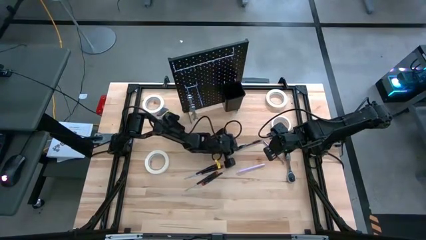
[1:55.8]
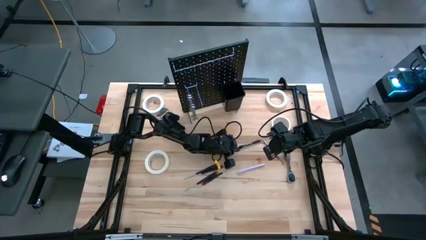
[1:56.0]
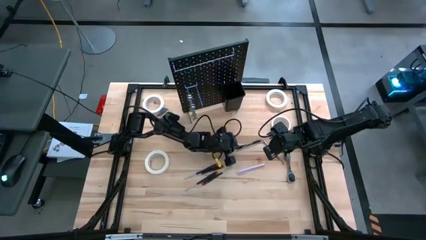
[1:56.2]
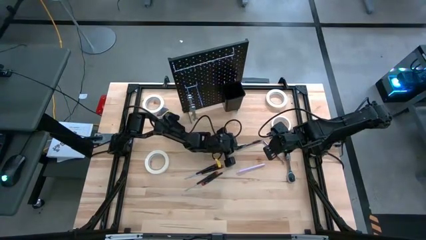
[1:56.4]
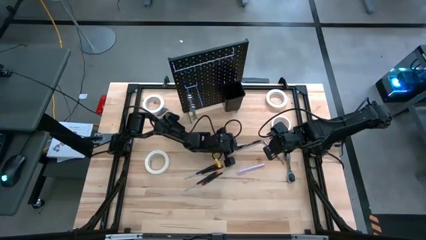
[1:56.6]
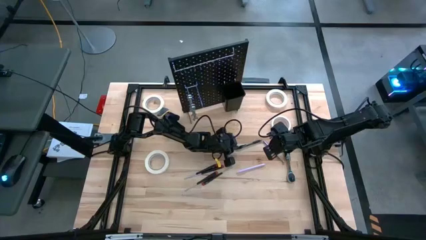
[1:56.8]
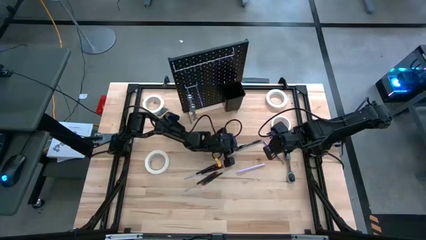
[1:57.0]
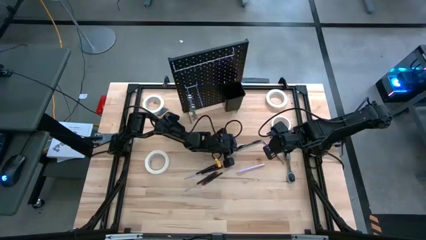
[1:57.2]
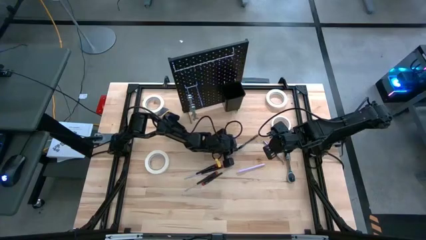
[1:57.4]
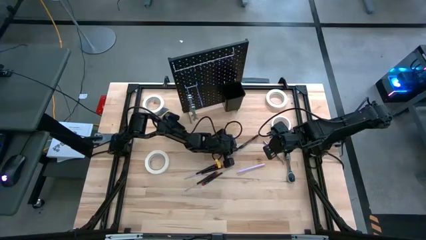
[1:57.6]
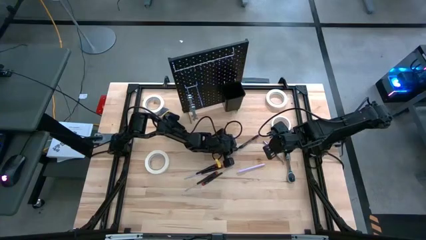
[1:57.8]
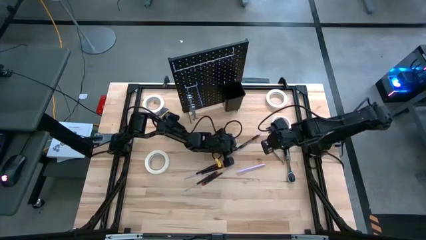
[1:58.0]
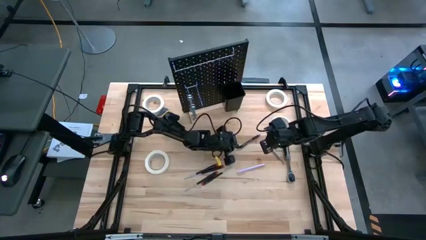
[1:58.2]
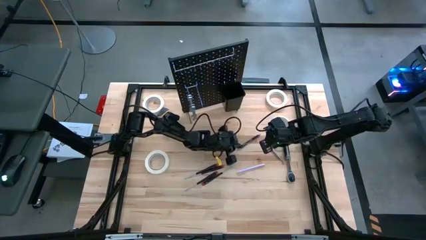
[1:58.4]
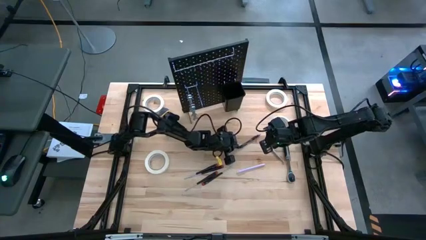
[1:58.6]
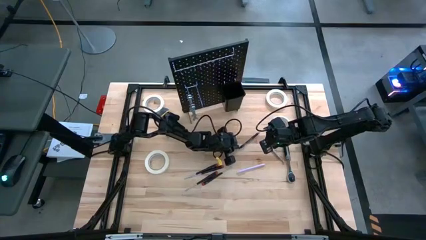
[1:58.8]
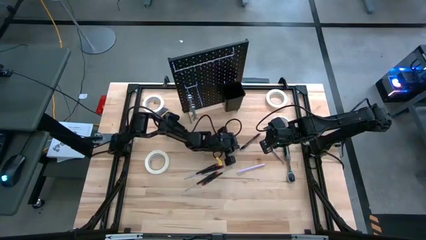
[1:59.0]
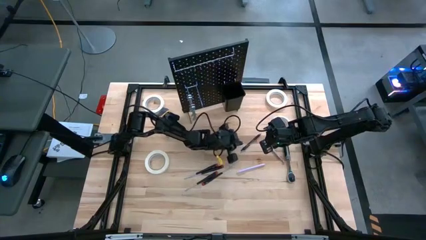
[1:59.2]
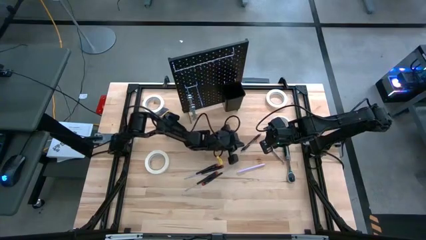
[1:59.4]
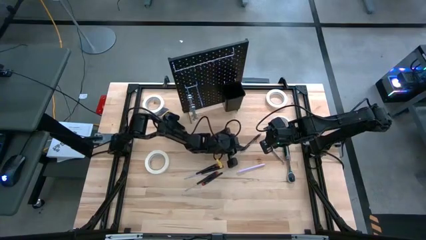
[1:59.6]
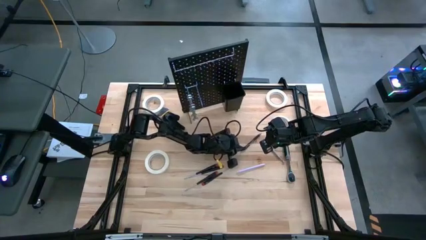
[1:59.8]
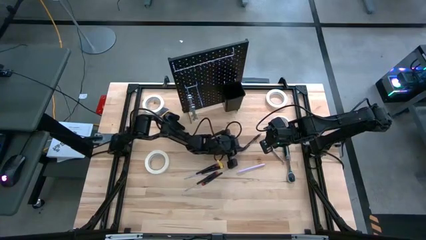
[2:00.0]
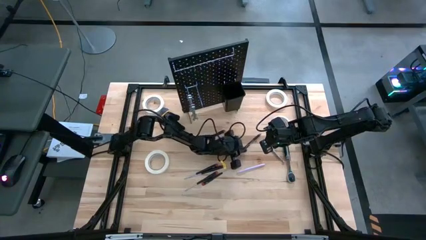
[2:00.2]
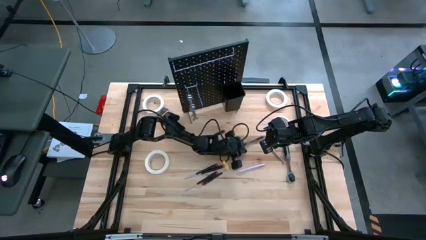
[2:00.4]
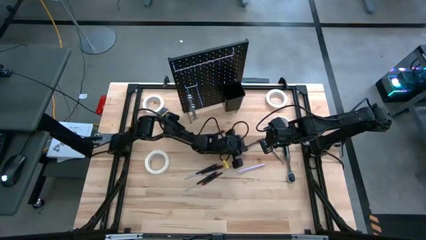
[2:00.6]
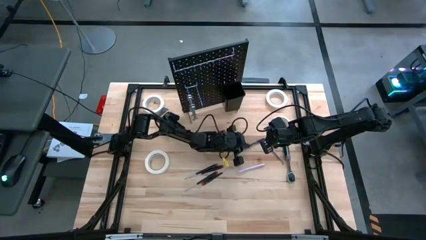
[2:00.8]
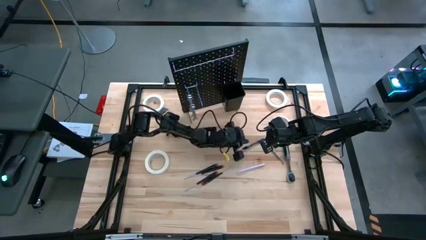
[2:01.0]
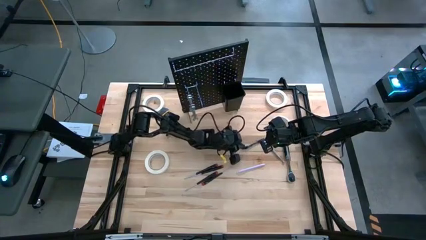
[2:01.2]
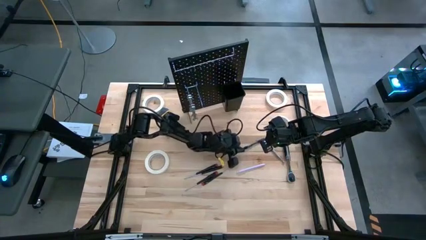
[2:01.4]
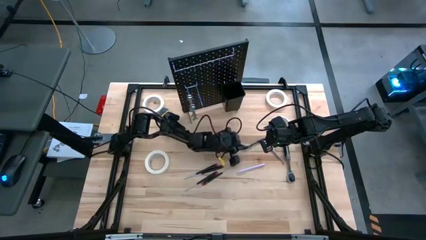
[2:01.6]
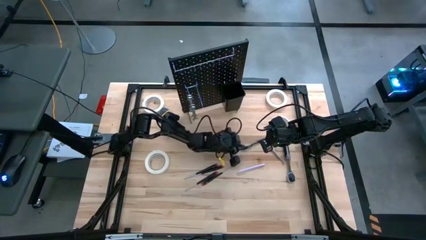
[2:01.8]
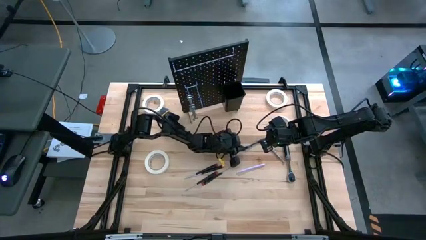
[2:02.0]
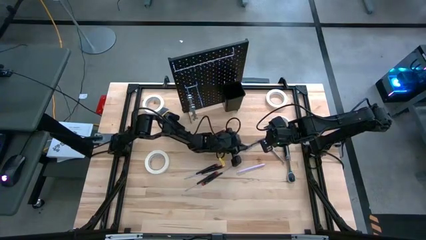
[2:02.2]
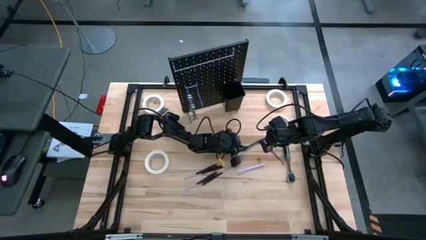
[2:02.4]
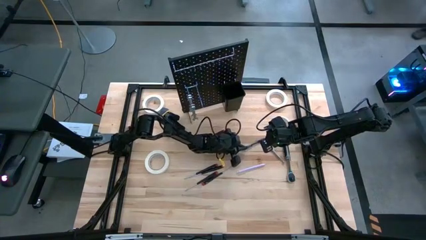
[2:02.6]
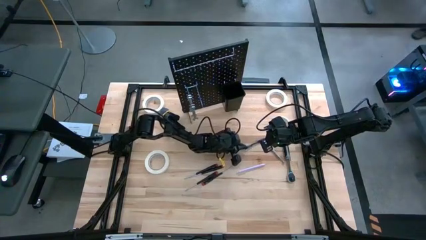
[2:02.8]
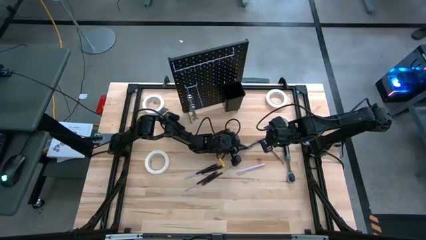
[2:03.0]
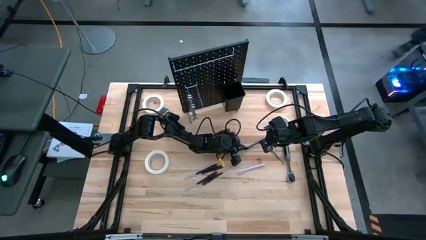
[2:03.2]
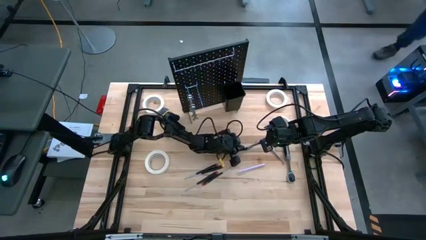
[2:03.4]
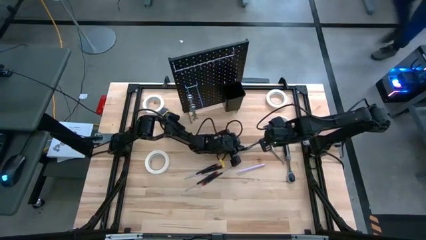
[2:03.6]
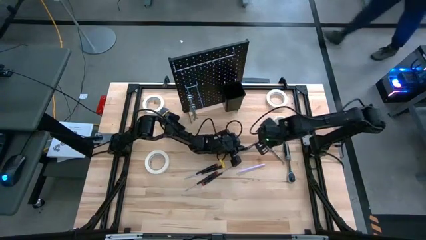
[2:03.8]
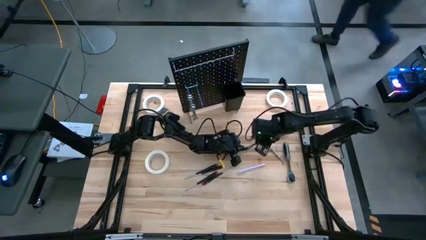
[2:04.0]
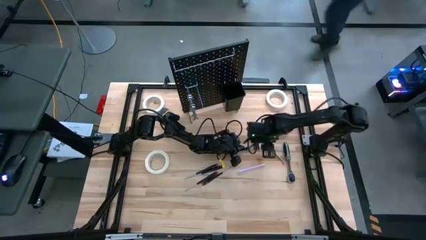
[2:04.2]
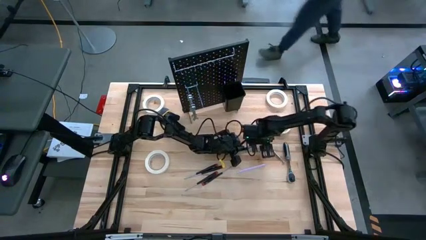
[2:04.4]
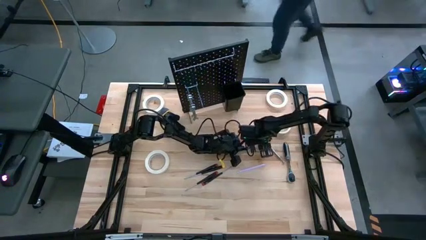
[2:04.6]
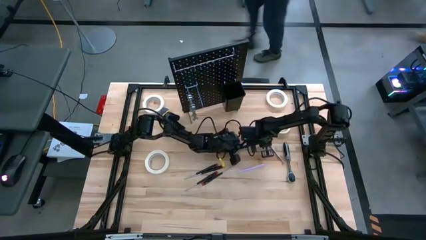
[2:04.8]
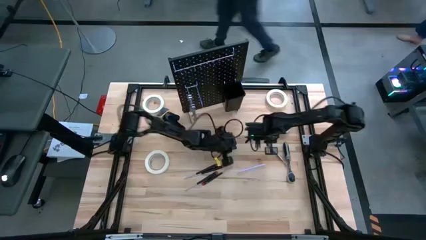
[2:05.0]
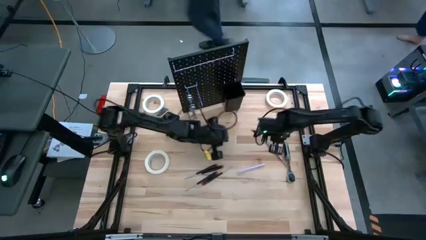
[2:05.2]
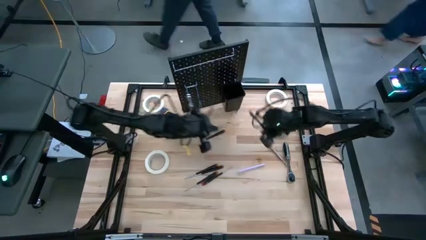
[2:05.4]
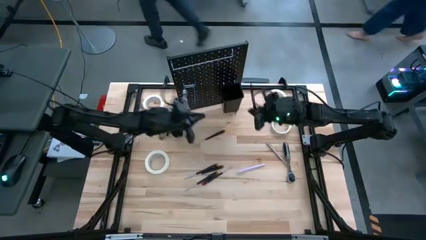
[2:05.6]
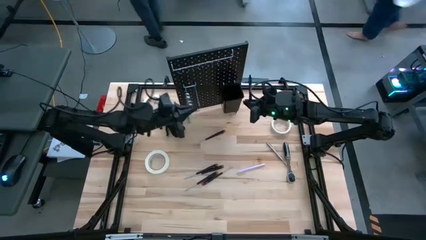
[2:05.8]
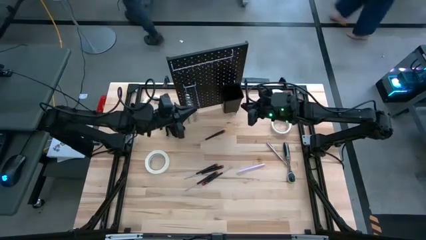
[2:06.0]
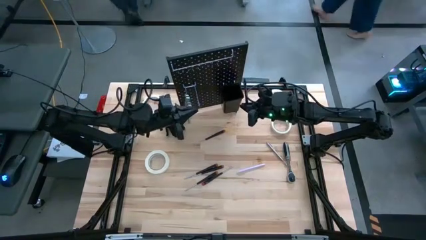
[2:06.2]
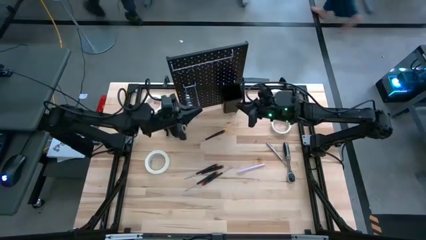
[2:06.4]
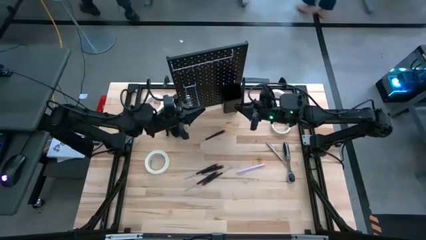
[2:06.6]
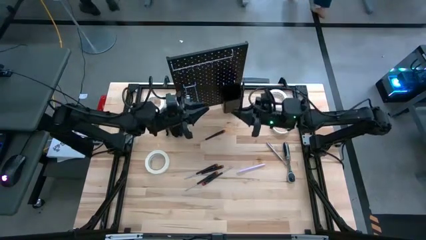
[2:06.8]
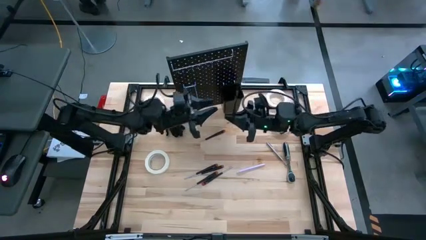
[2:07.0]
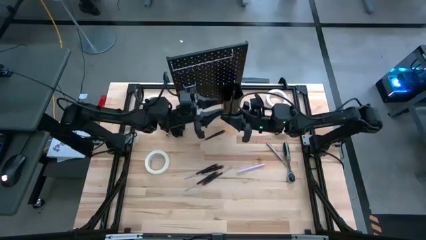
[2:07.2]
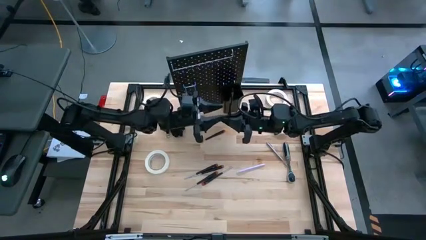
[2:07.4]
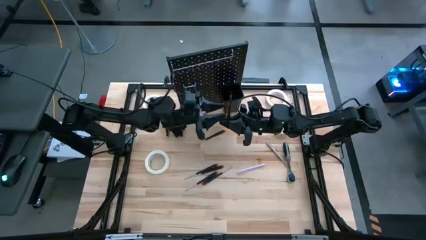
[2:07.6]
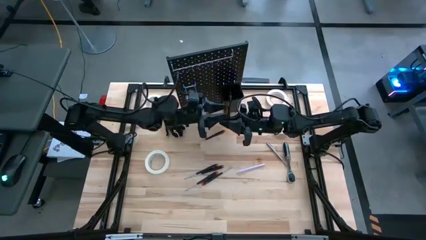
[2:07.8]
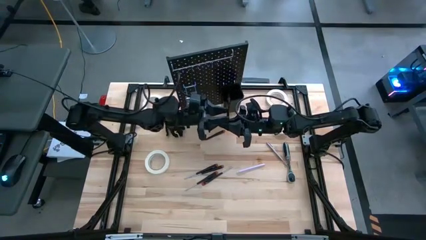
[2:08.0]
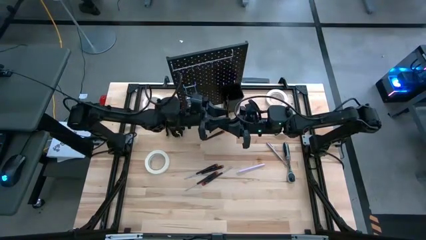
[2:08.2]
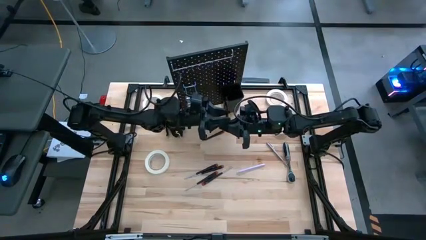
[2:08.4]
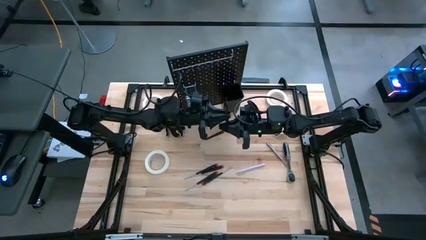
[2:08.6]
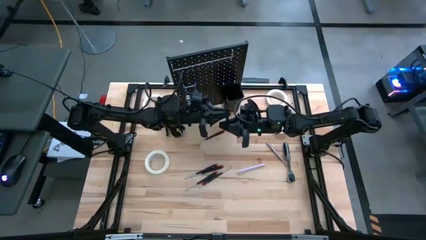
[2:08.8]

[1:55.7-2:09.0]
Task: Hang tools onto peg board
Put the black pen into the black bin on the peg board
